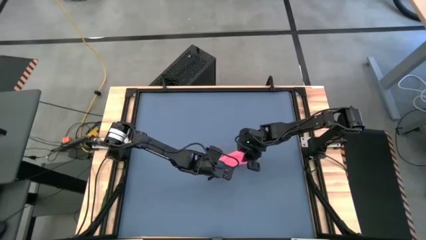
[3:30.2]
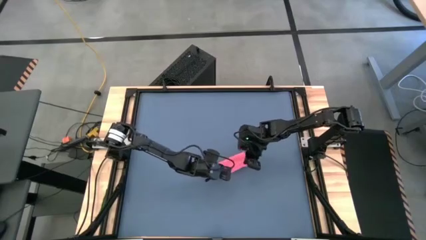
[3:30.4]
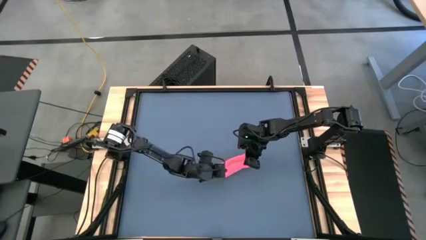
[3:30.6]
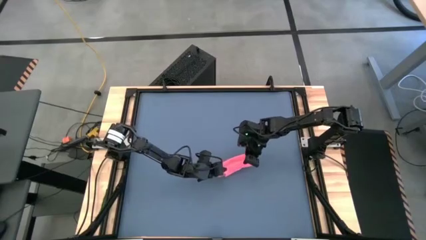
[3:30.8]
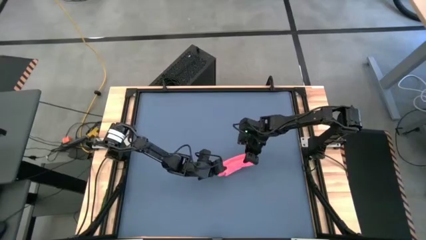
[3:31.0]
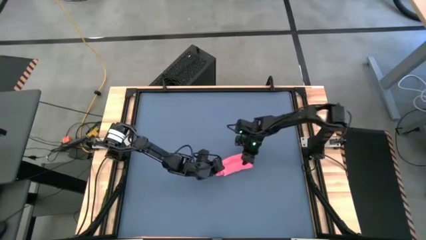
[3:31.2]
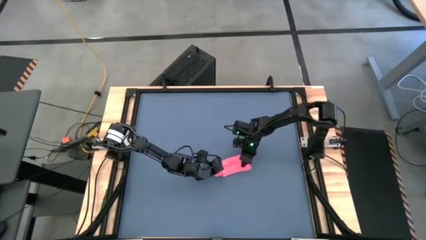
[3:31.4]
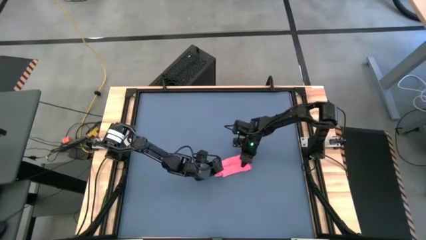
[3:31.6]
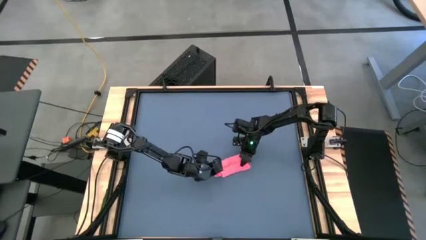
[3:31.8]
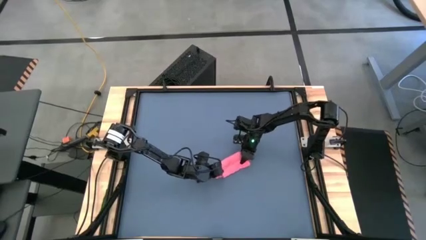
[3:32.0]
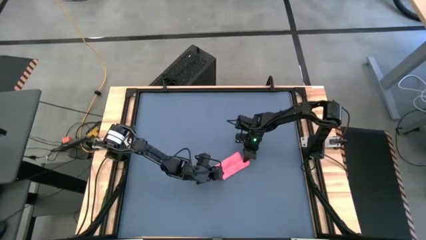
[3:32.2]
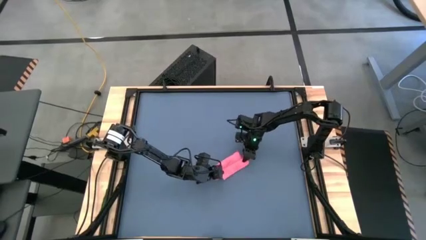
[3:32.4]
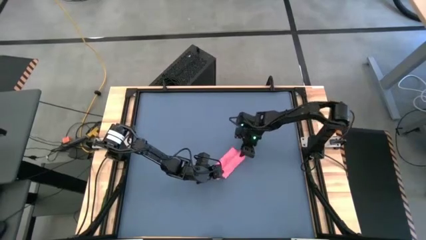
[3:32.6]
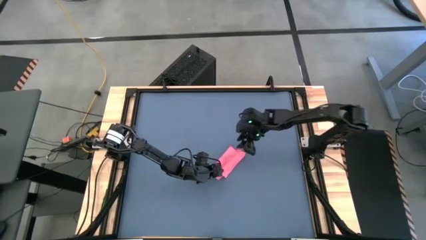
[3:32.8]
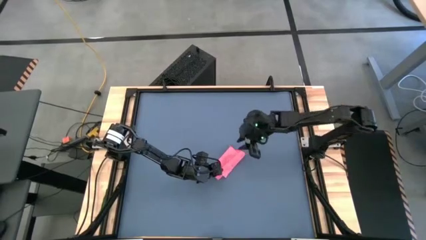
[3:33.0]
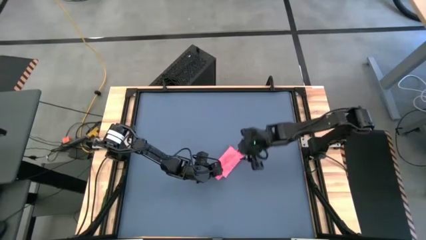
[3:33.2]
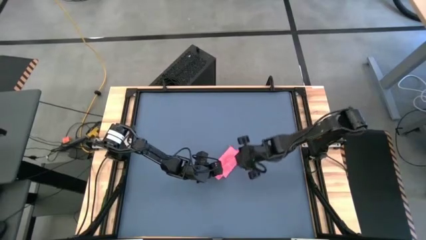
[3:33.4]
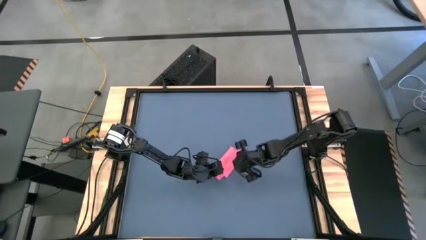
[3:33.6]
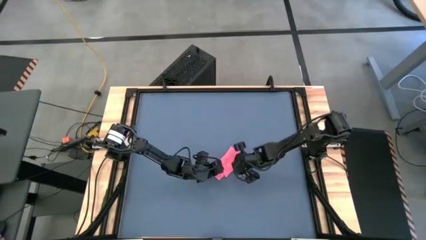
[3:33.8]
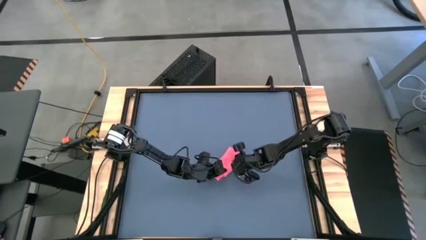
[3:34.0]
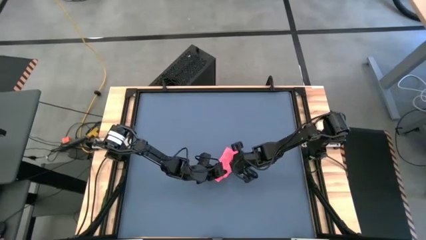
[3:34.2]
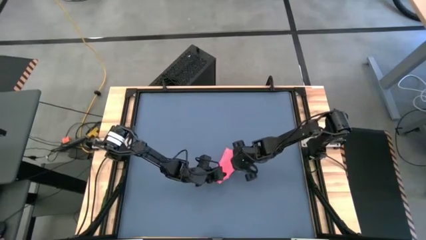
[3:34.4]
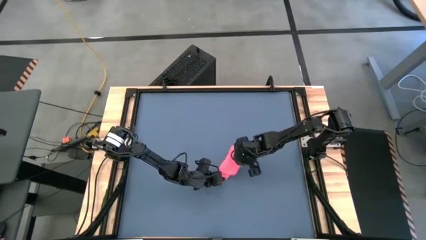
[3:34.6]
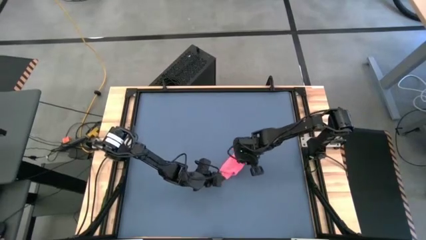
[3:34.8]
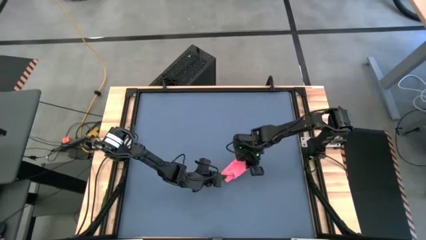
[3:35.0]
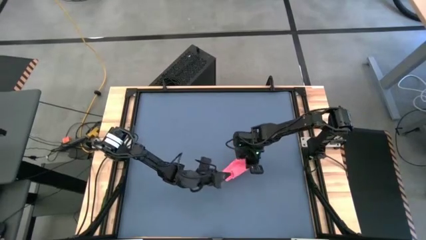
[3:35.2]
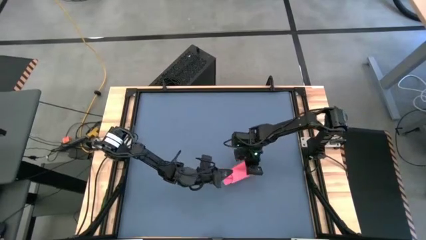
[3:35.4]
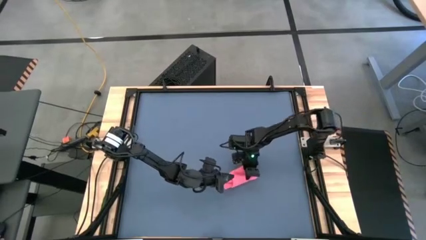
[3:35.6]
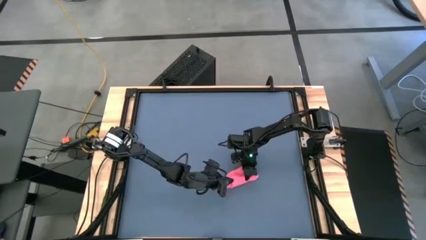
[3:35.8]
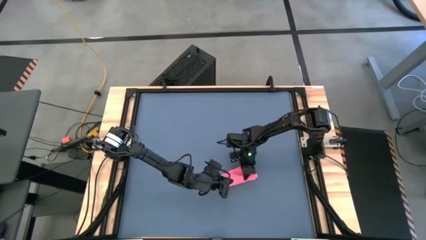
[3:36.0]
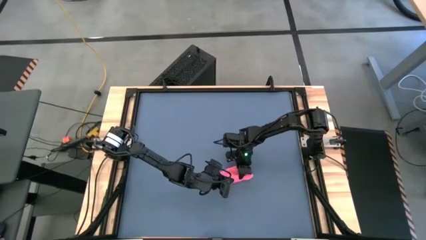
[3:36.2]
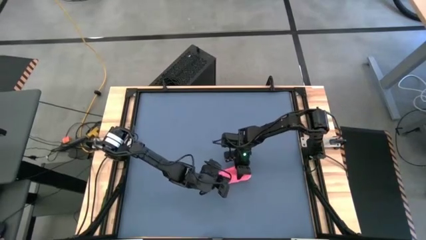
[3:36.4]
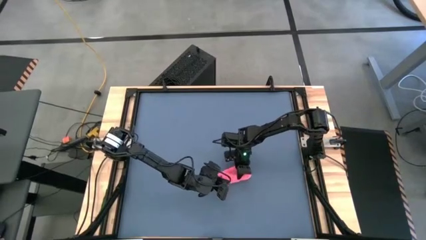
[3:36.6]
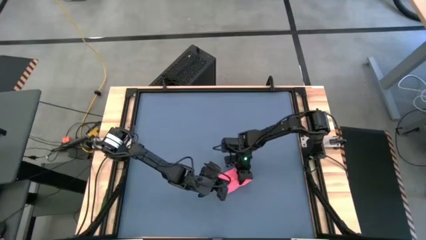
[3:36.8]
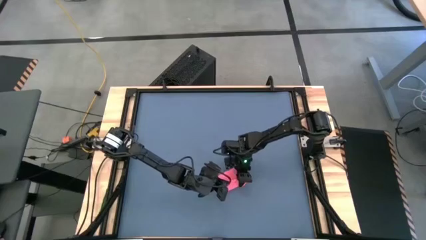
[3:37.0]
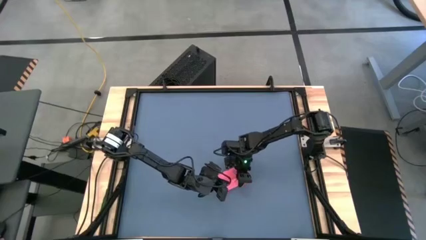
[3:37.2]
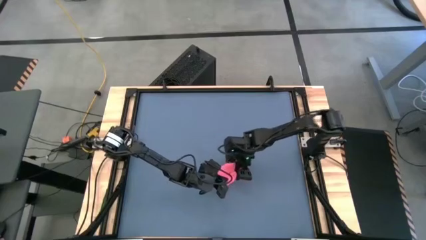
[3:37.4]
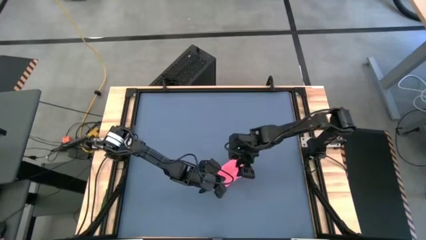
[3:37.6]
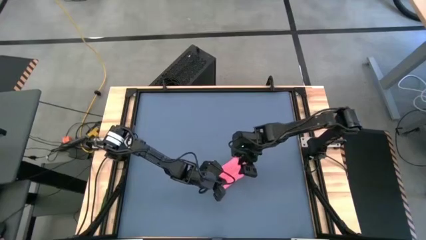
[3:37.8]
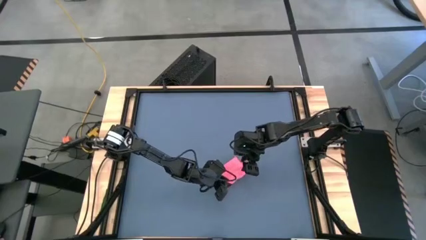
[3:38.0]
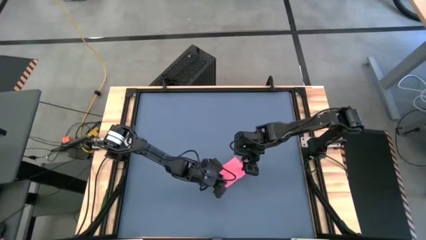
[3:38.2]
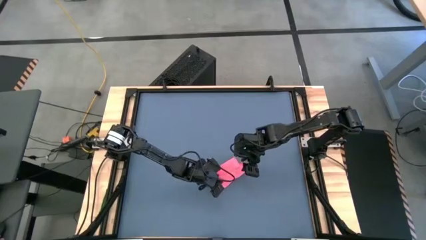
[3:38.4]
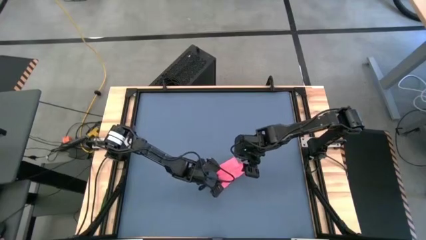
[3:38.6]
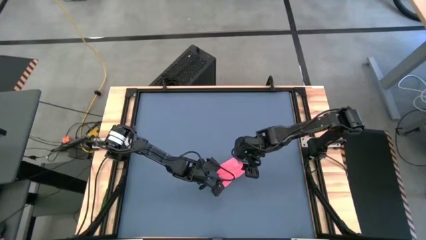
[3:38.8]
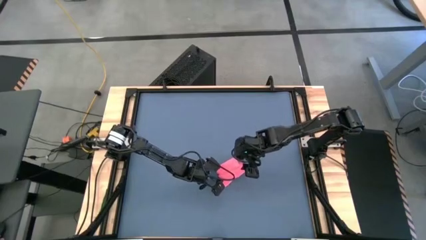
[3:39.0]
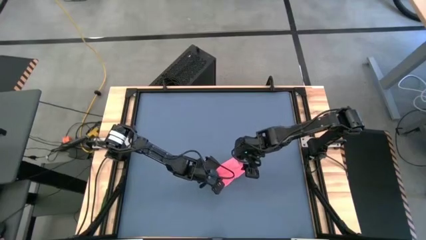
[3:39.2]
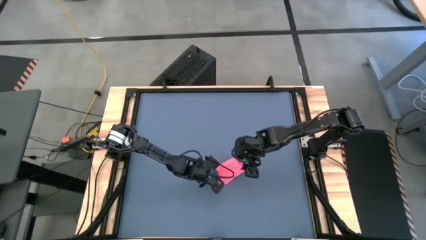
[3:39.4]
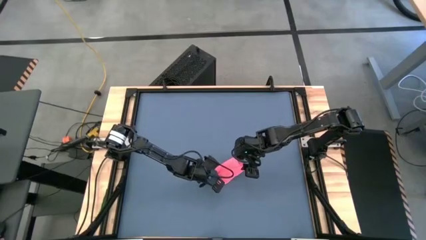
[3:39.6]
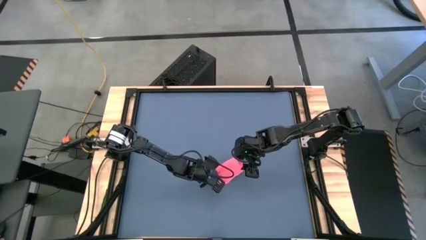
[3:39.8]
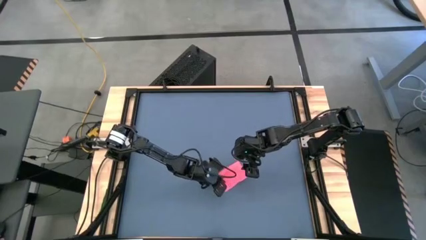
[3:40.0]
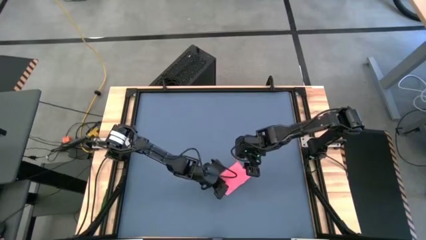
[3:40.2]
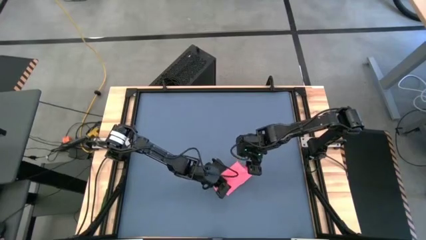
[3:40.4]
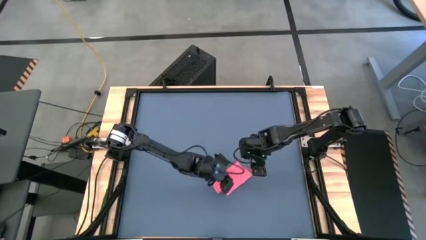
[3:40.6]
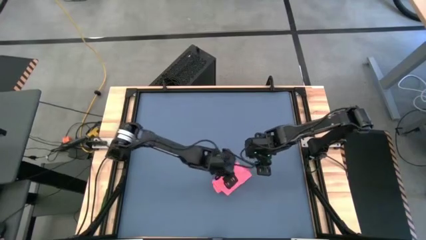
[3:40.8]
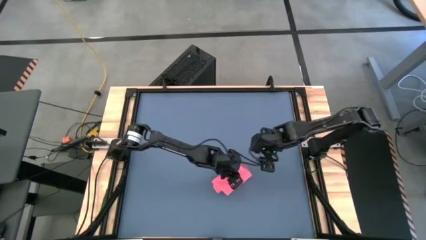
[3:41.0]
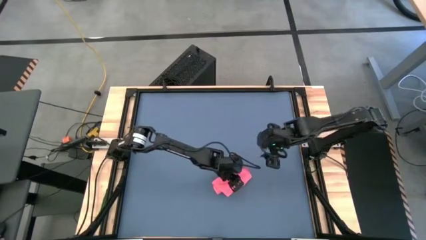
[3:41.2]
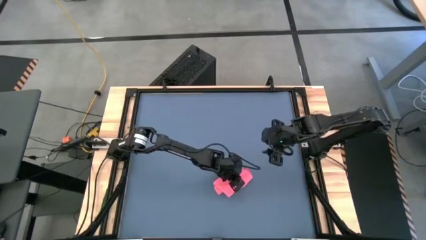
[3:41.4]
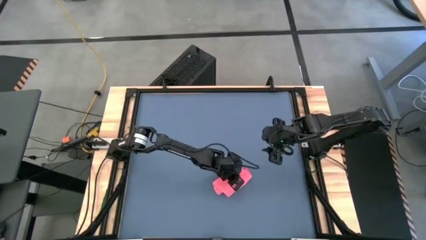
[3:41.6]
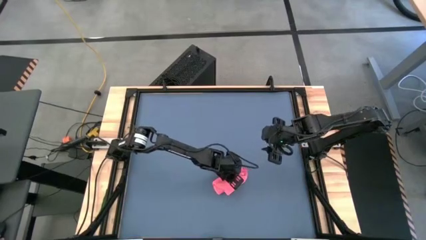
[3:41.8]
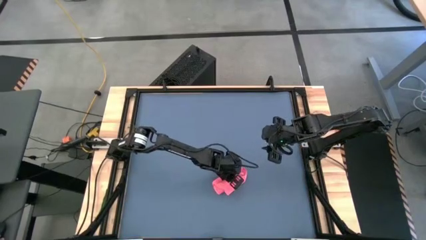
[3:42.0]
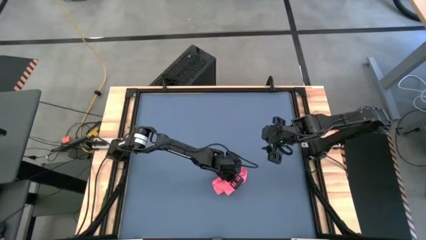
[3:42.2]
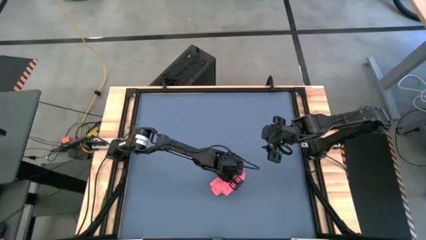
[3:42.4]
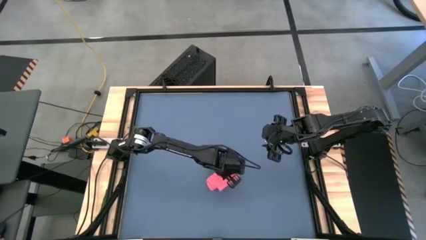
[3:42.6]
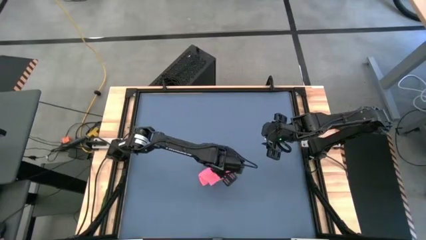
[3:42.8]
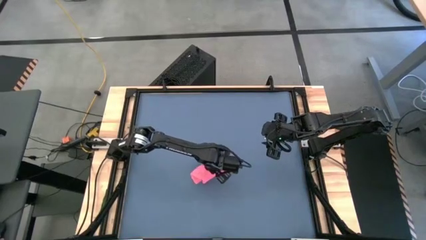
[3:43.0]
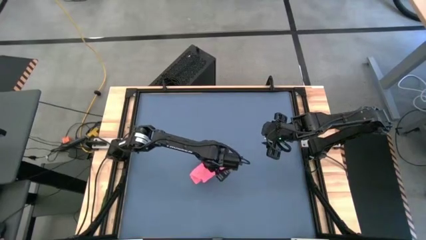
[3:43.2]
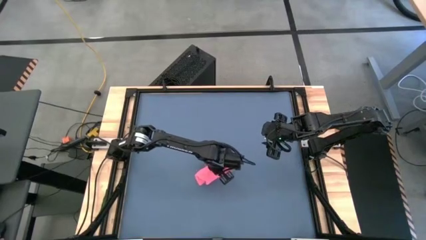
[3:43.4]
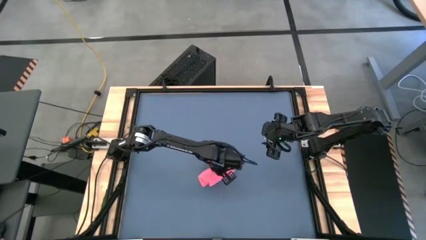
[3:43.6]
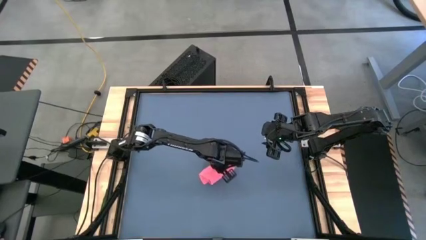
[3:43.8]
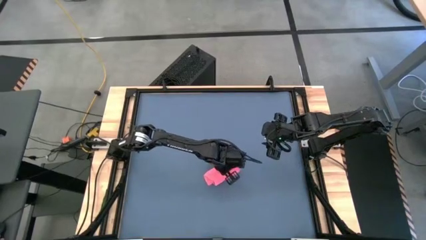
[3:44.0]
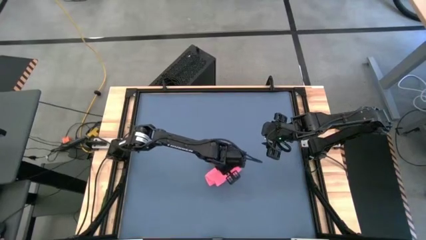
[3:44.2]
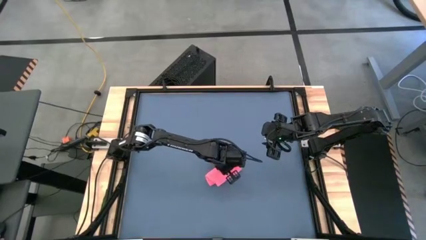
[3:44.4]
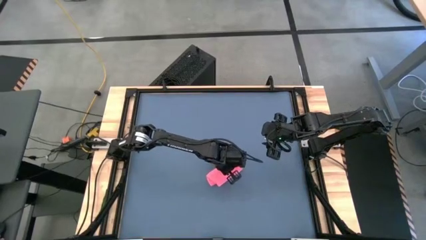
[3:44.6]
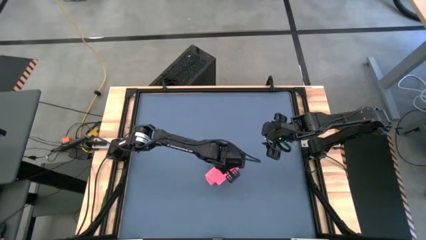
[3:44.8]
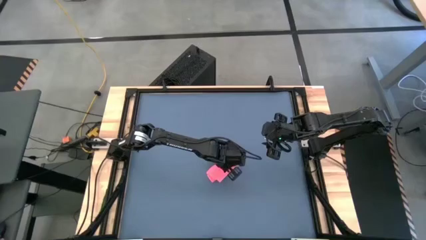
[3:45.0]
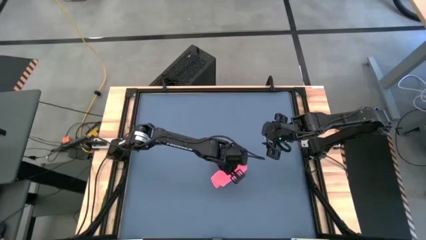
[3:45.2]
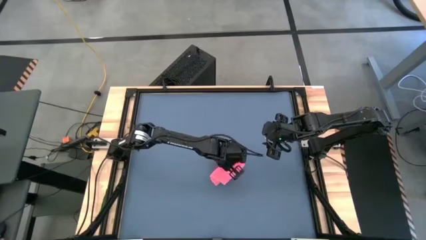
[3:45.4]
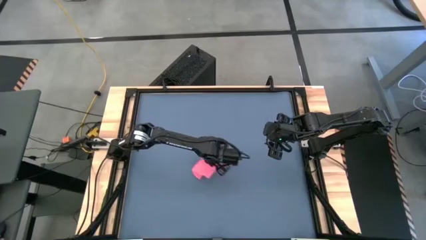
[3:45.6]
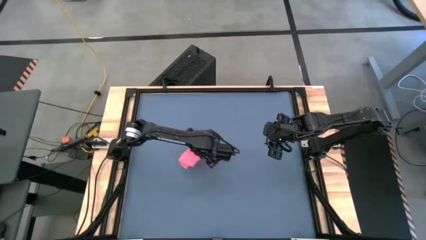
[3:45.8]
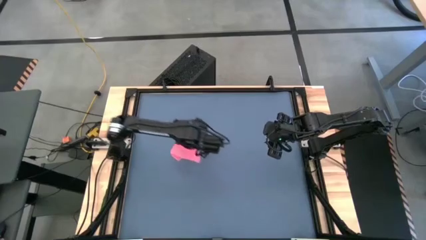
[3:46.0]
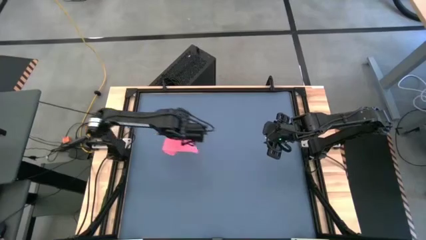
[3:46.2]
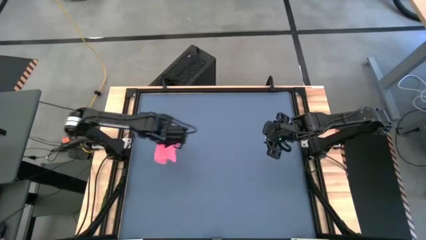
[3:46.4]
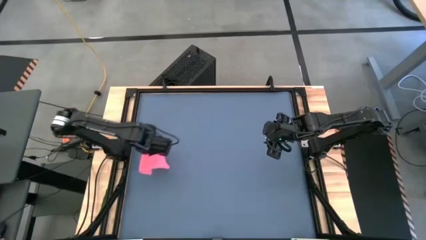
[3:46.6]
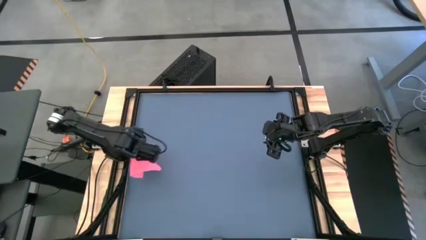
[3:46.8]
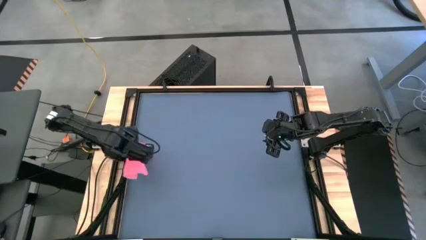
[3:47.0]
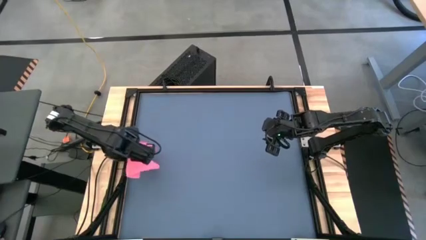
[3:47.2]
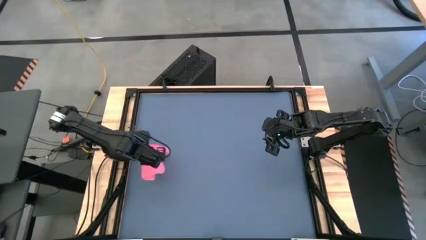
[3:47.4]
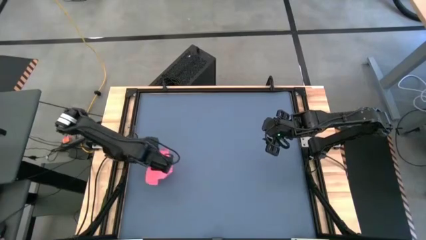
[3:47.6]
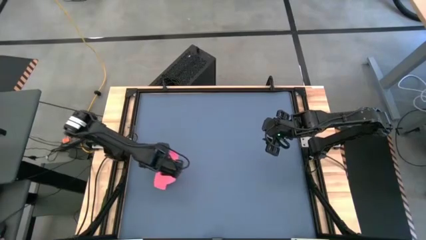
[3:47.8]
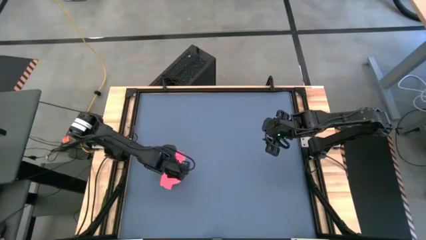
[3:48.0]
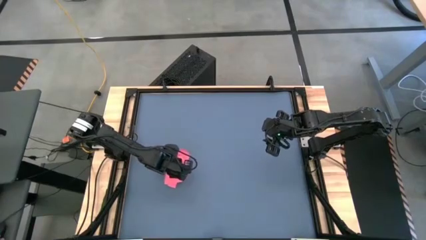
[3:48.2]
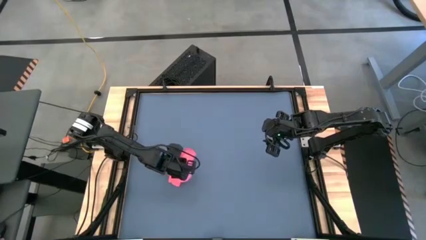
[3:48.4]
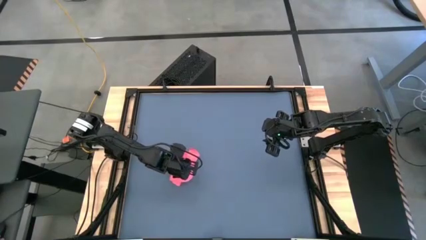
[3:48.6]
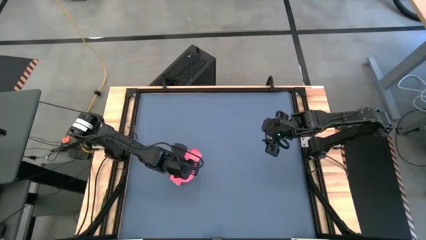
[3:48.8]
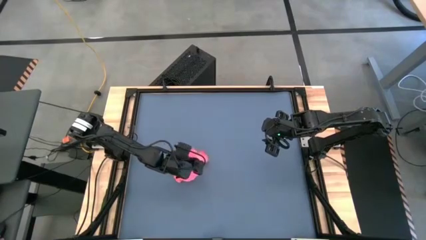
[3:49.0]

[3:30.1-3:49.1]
Task: Roll towel
Roll the pink towel
